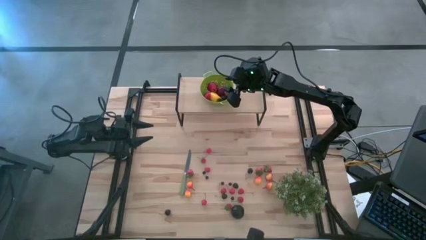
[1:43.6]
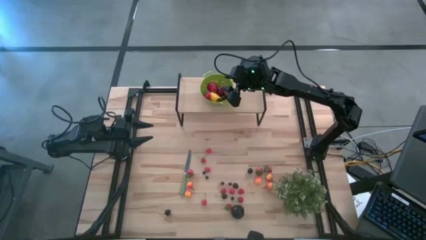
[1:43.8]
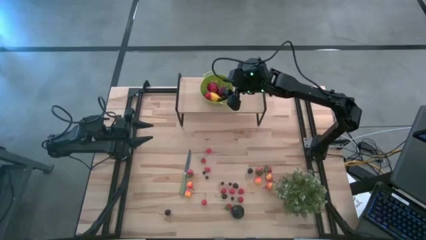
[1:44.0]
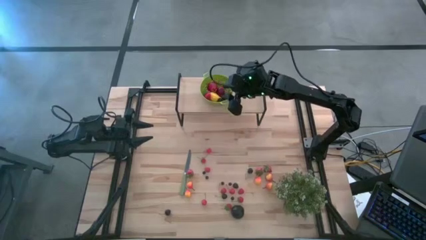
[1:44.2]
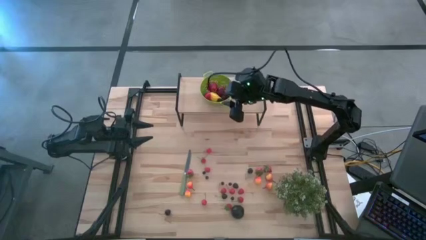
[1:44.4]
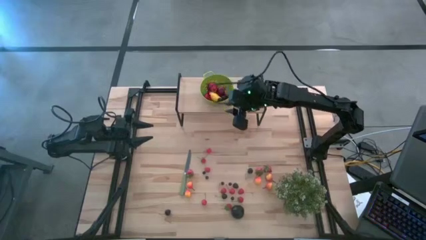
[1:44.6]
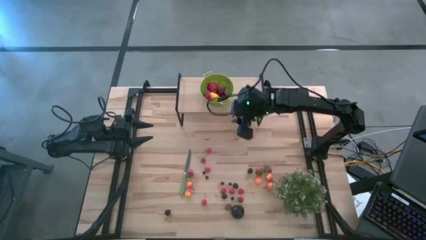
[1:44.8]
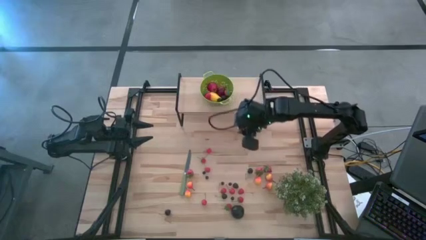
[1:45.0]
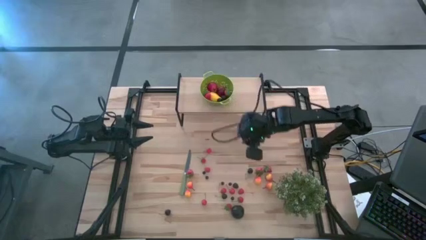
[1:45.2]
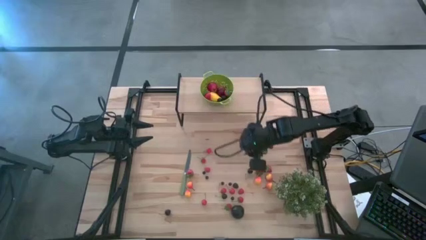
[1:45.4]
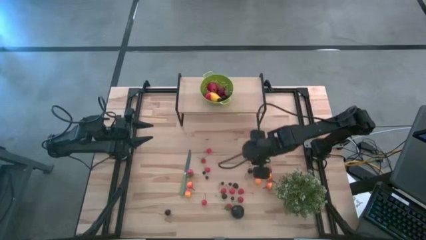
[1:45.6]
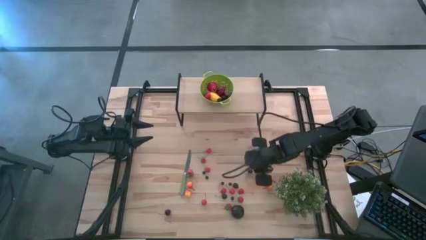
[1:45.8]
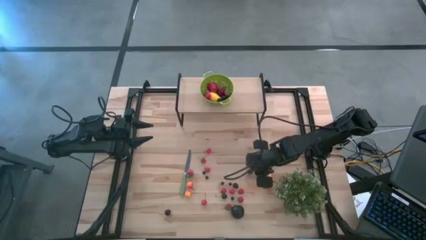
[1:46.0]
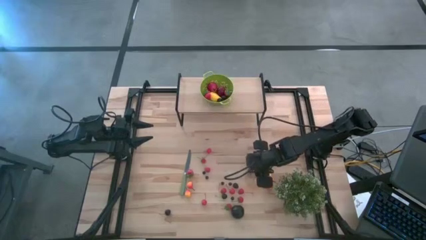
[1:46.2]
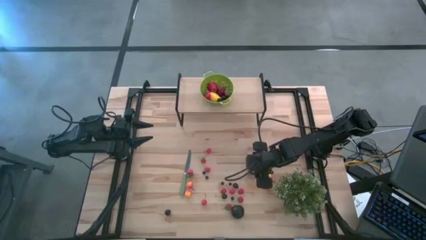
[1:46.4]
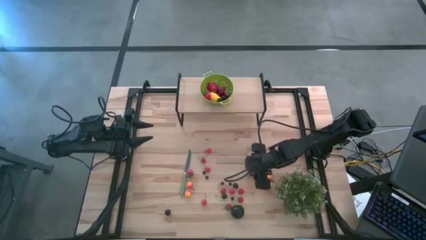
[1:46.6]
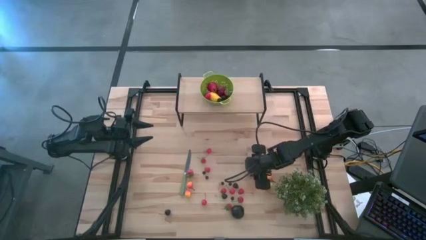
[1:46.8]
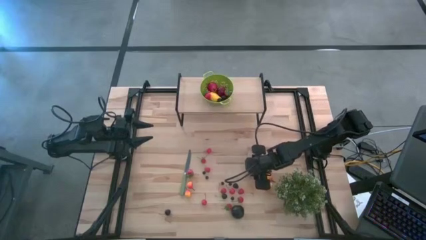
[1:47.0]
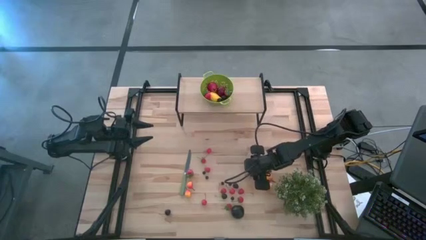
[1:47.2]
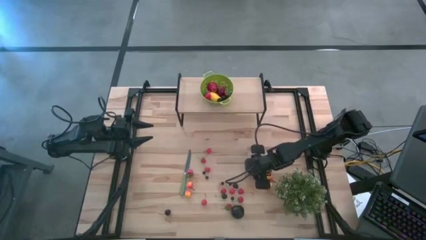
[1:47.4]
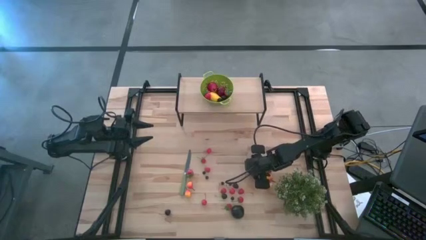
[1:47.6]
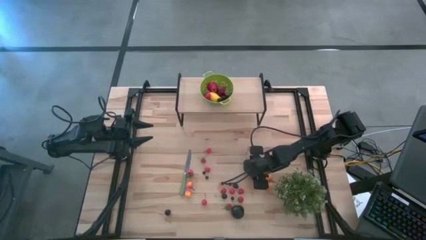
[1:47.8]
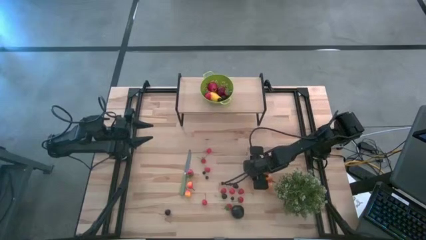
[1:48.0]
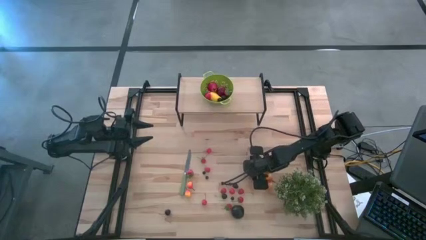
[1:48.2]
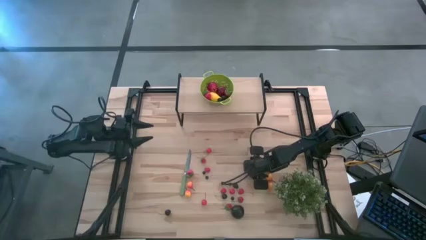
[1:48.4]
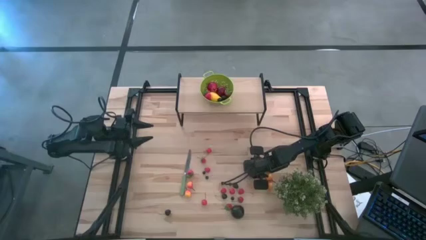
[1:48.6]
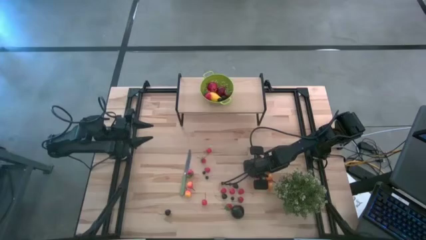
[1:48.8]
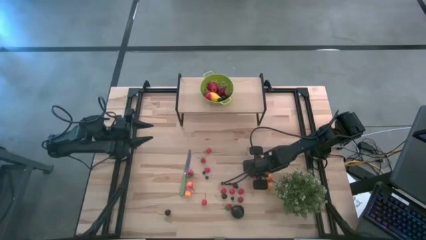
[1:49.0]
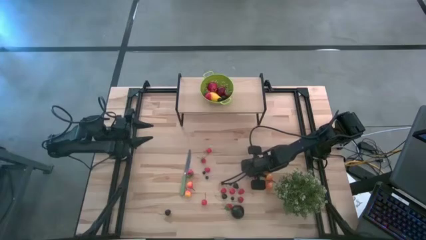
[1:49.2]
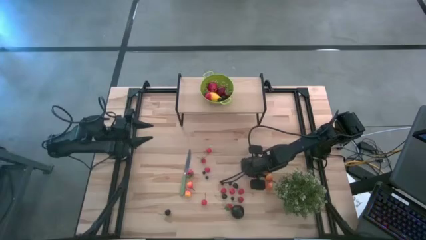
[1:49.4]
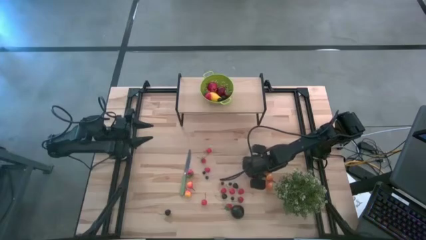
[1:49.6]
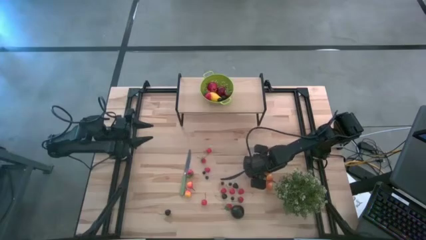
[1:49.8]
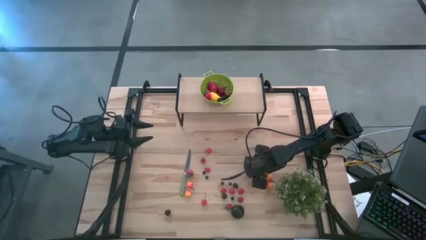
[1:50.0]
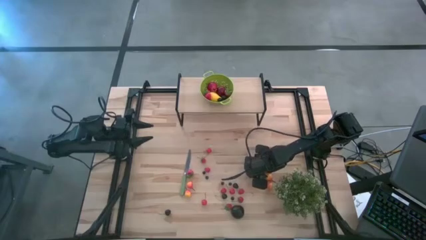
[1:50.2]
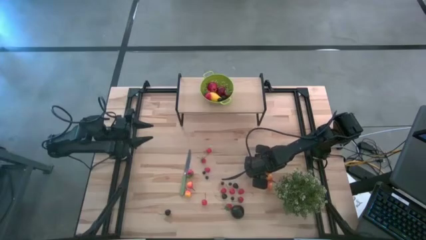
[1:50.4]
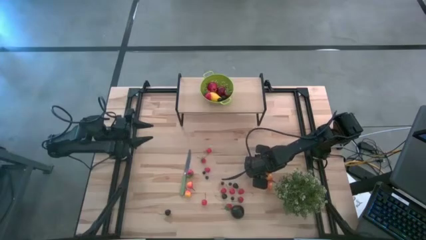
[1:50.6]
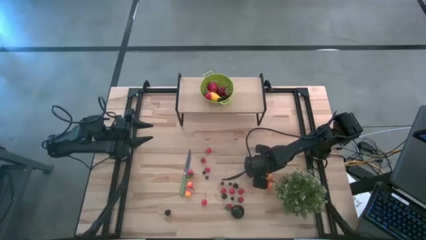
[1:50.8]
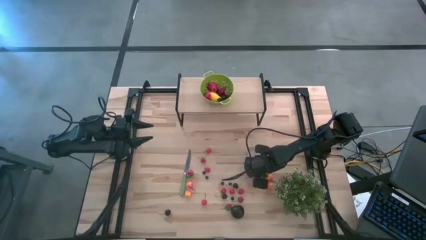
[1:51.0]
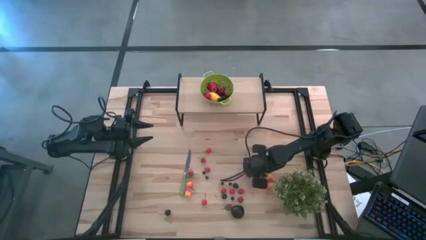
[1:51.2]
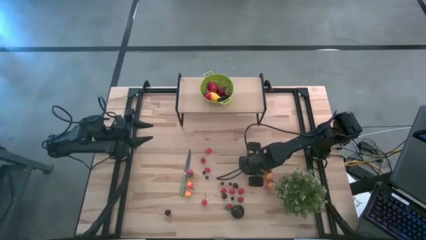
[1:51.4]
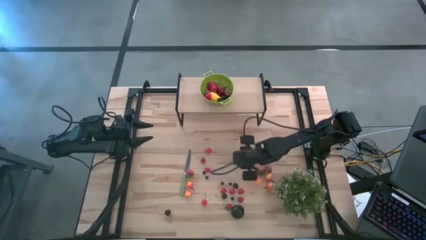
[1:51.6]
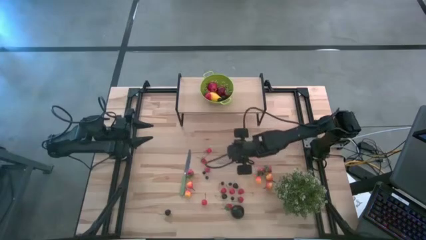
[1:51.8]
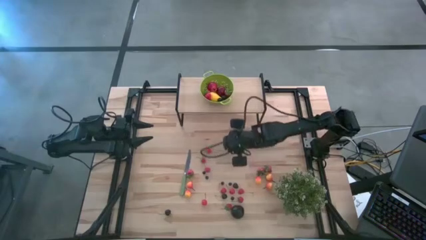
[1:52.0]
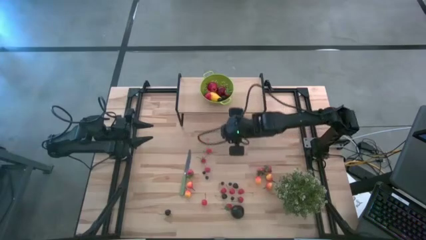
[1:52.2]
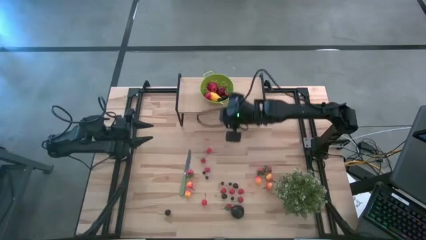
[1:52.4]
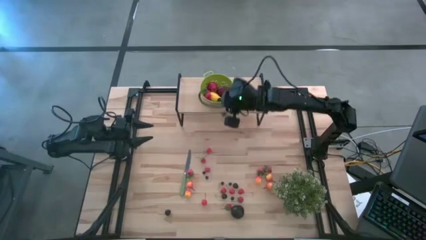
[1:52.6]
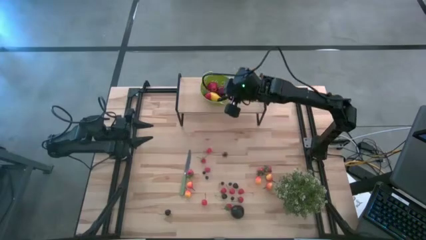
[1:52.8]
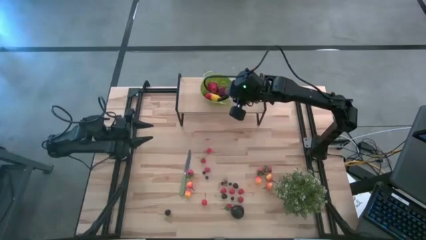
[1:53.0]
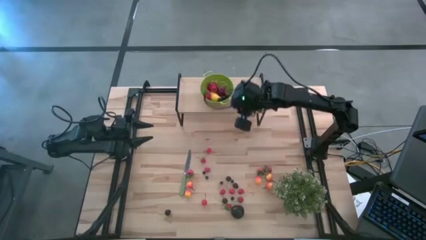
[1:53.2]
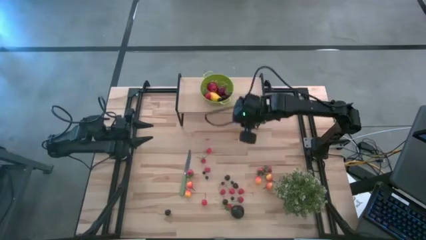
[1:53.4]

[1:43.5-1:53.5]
Task: Pick & Place Fruit
Put the black cherry into the green colander on the shelf

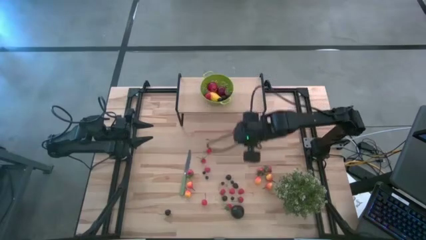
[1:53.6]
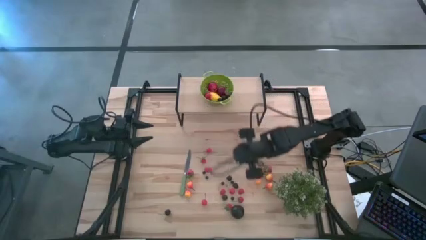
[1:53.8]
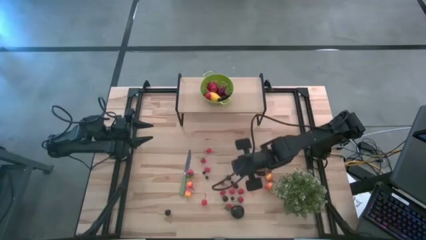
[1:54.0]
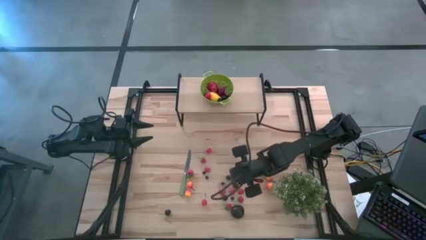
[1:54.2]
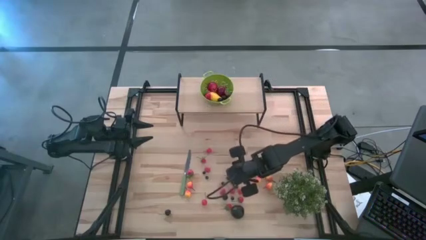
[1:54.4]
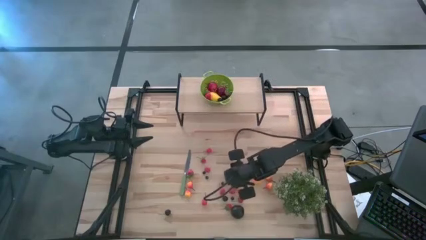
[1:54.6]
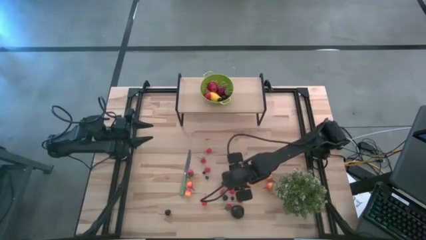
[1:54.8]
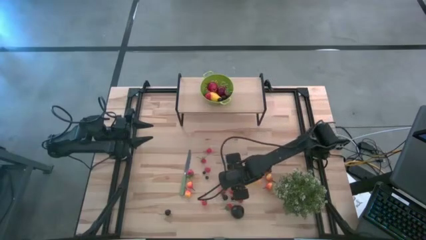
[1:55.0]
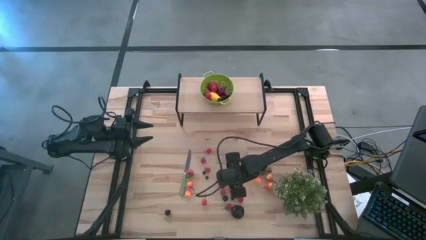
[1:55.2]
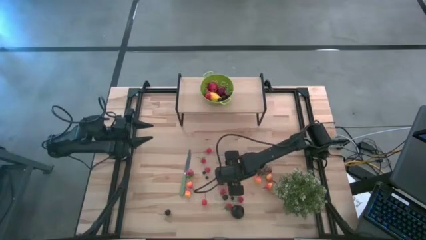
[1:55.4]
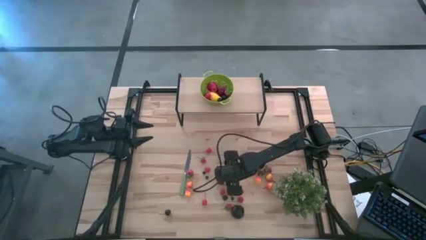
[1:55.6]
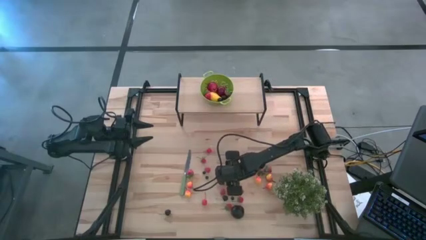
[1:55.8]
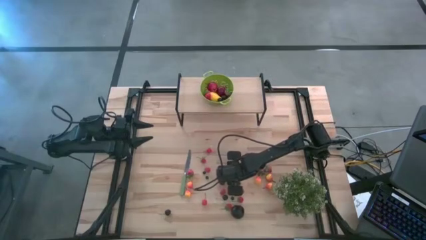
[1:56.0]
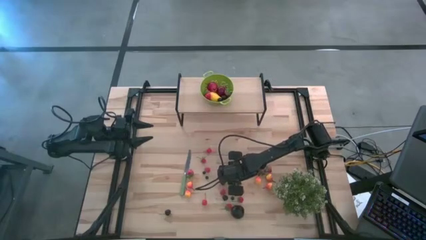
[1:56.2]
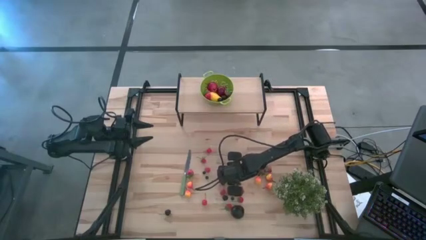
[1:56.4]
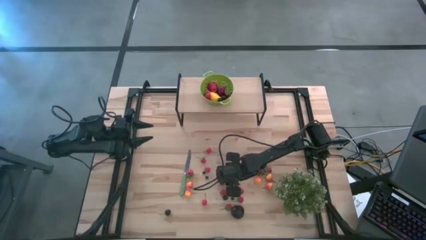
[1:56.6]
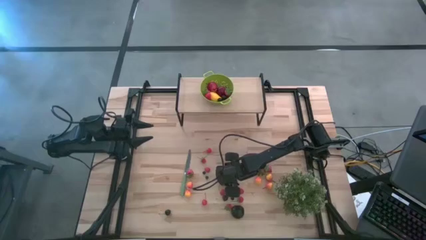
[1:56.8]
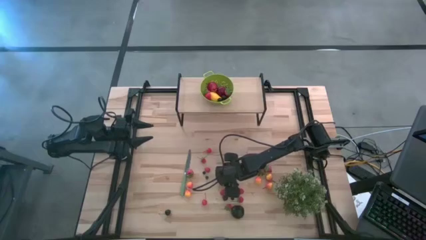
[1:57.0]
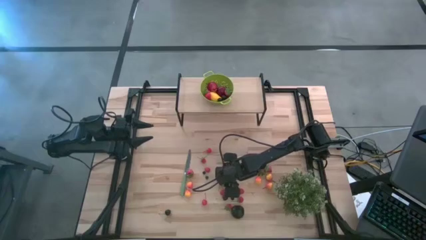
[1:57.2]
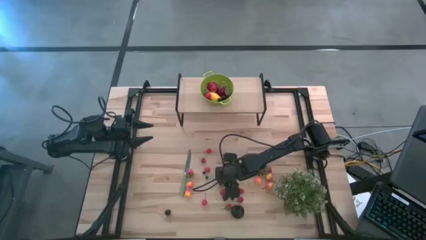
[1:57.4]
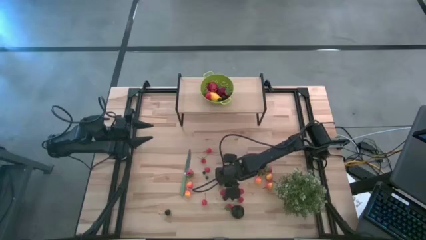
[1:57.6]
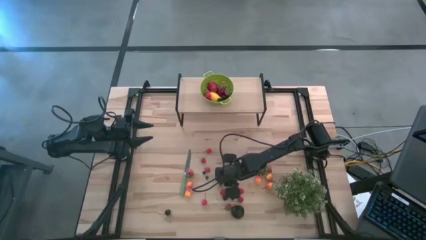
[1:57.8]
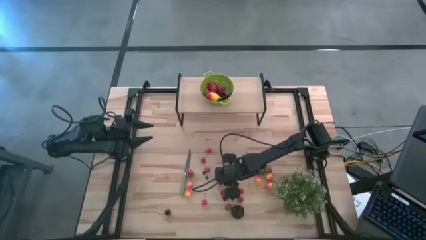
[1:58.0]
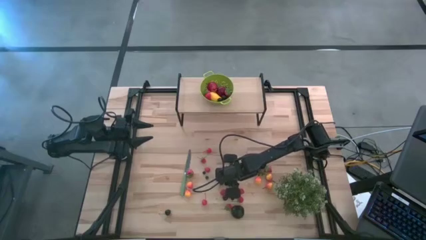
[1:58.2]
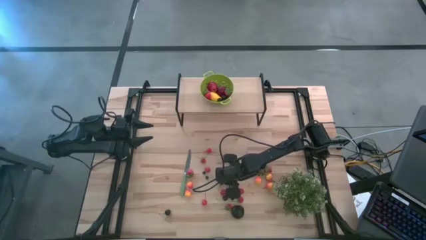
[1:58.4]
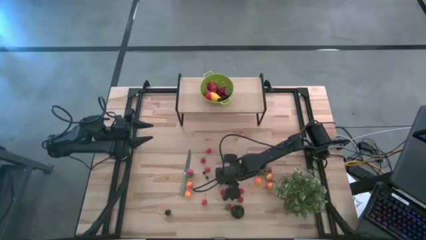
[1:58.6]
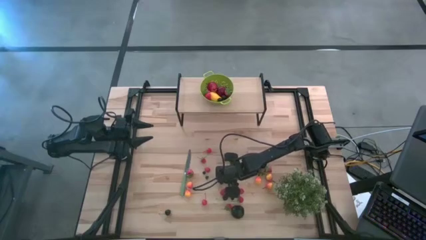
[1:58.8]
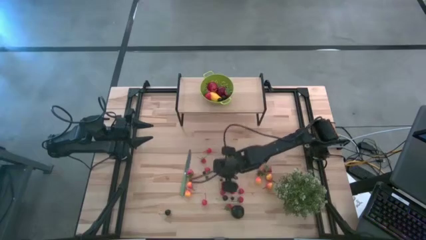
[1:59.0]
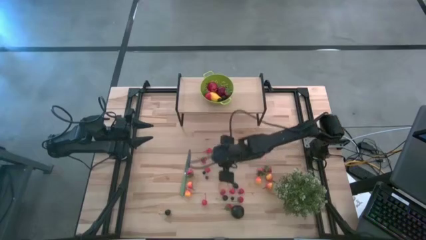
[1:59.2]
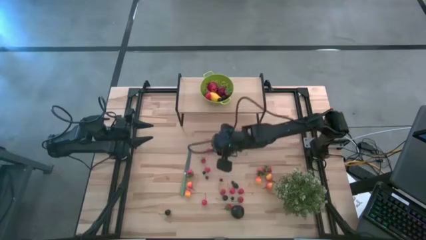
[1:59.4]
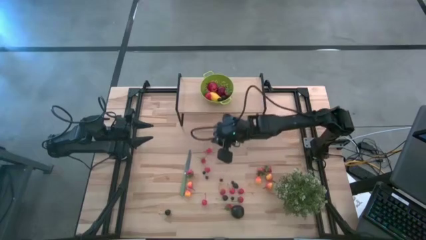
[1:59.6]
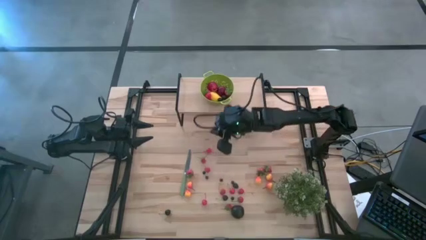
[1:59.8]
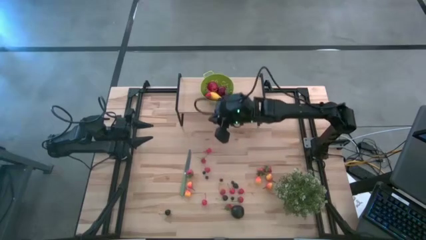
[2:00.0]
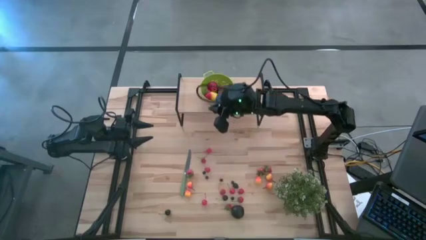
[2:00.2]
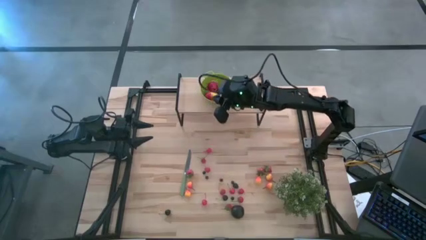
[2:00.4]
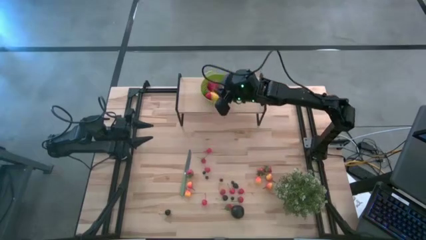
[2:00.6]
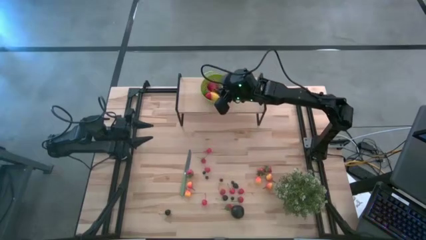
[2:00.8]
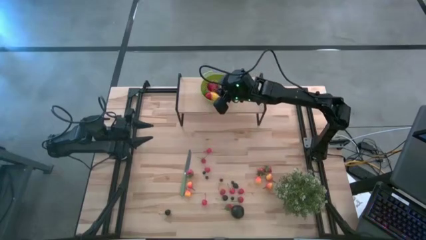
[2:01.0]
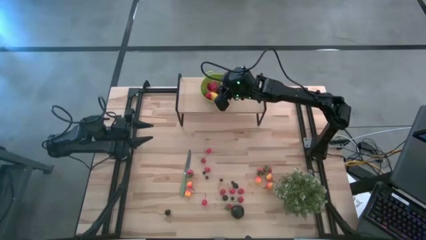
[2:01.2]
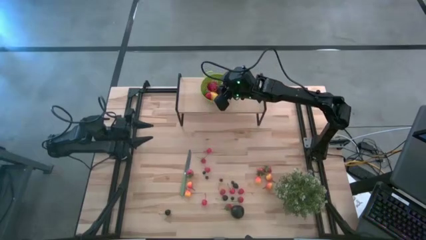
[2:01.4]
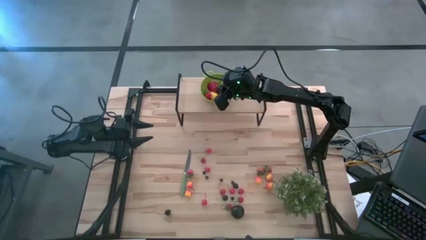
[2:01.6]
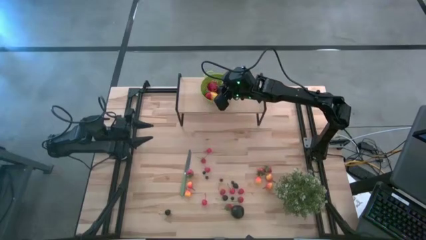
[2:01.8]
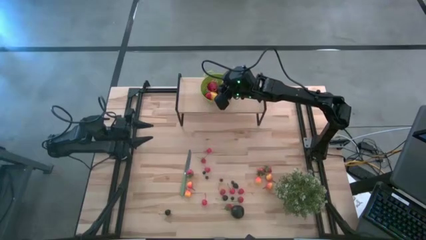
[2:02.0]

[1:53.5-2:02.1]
Put the black cherry into the green colander on the shelf
